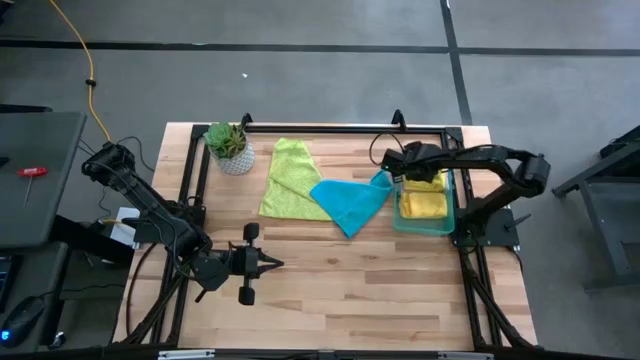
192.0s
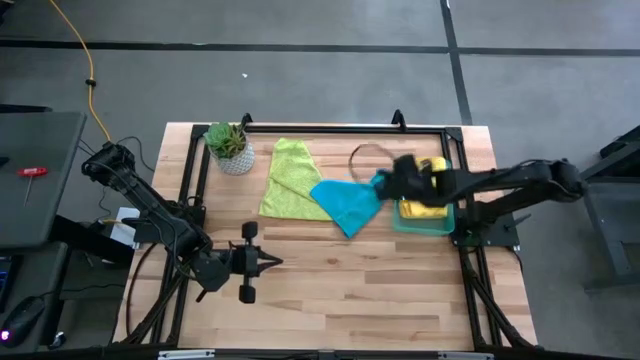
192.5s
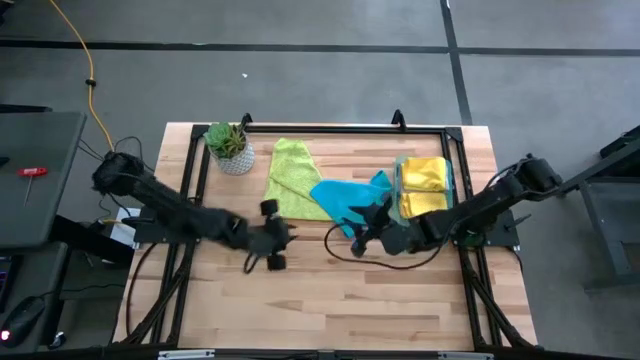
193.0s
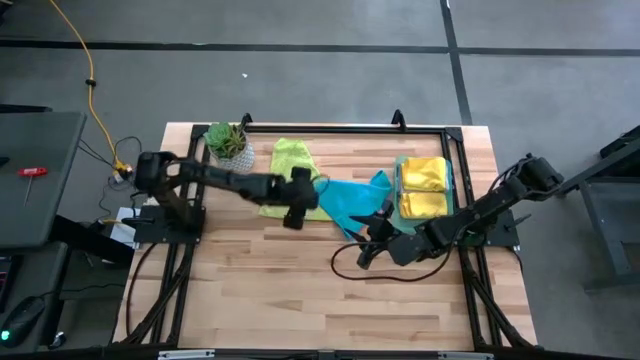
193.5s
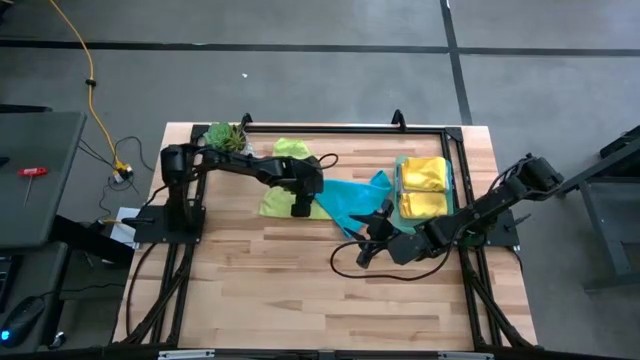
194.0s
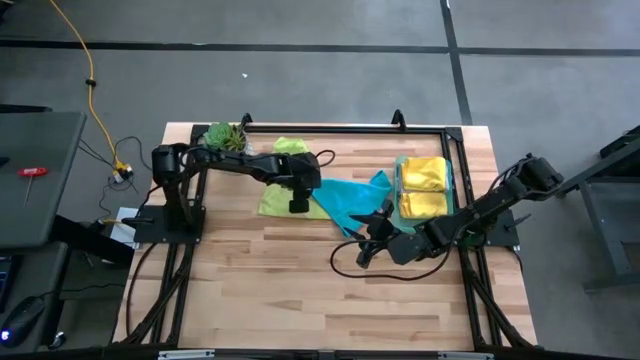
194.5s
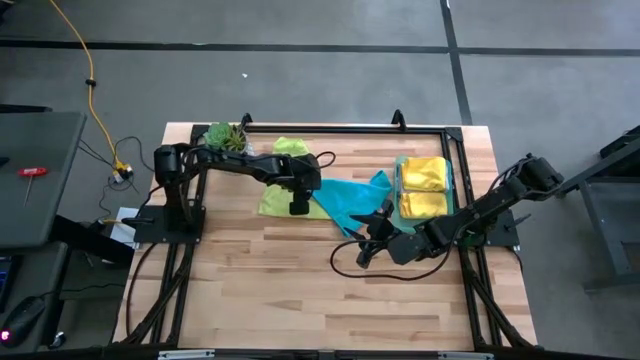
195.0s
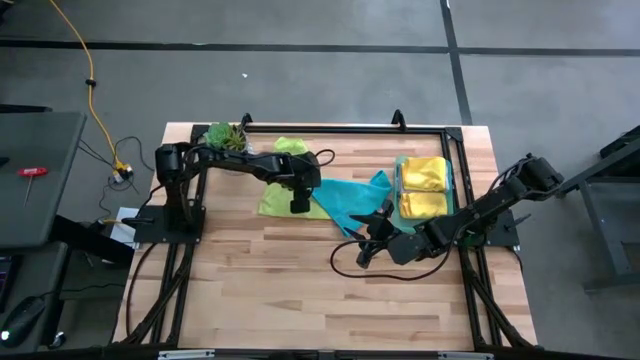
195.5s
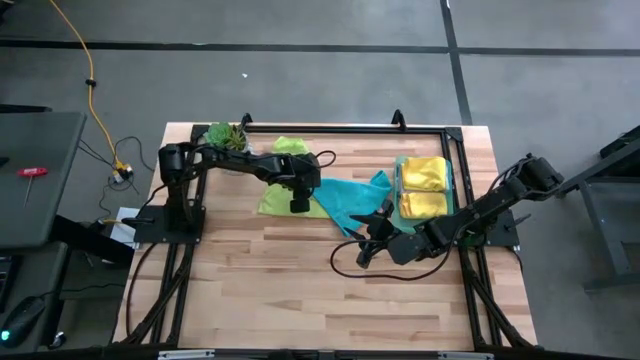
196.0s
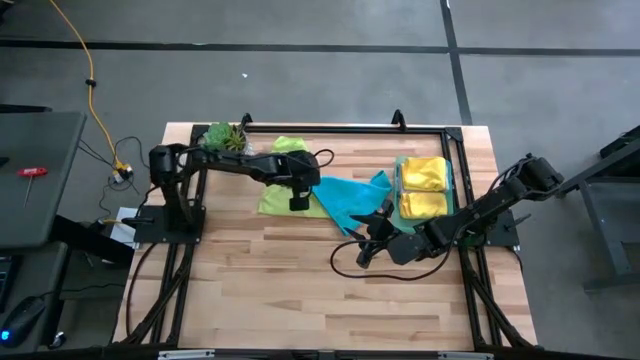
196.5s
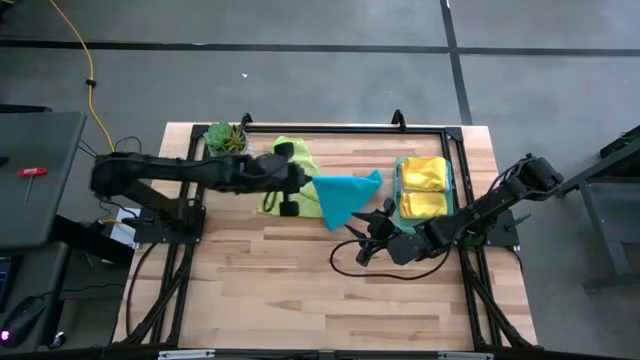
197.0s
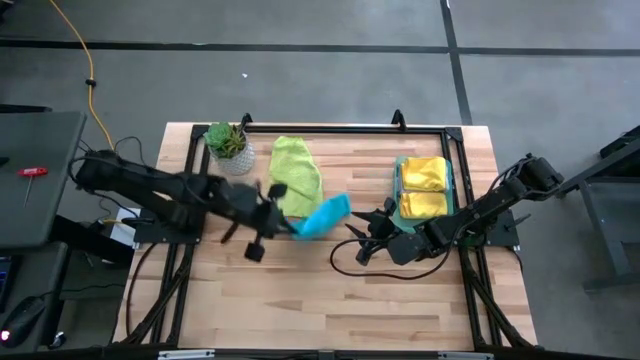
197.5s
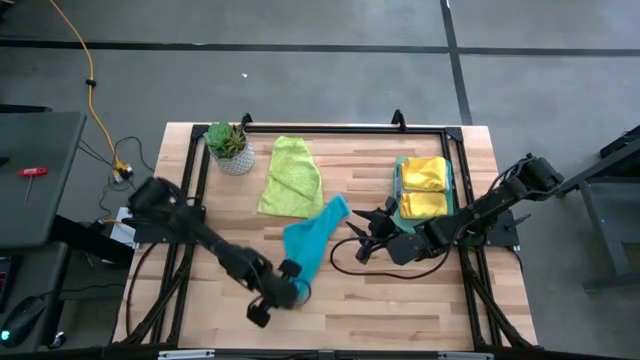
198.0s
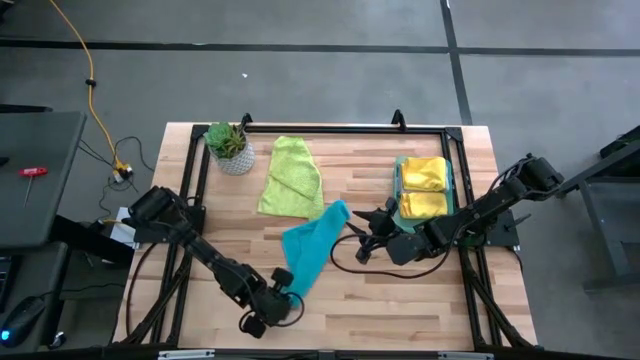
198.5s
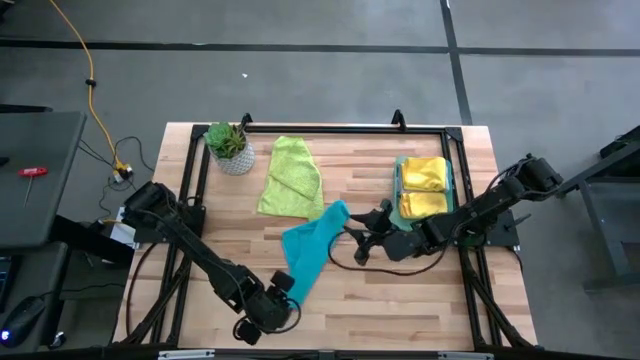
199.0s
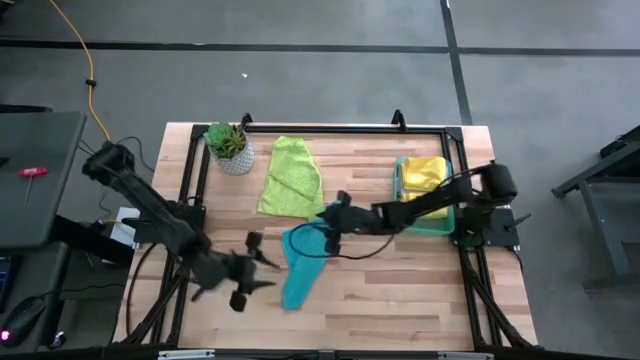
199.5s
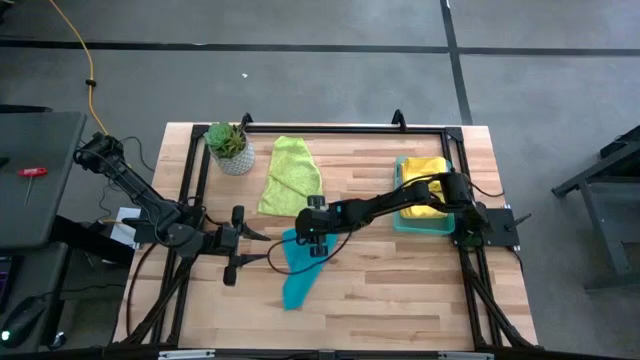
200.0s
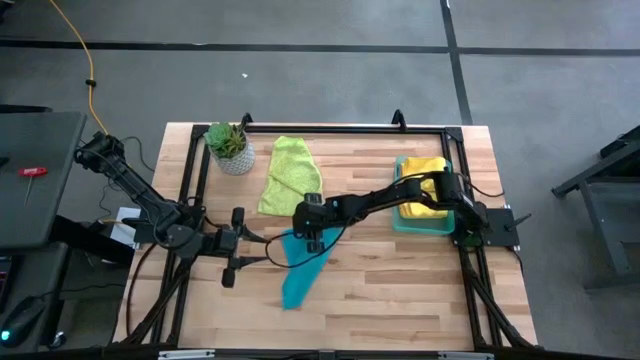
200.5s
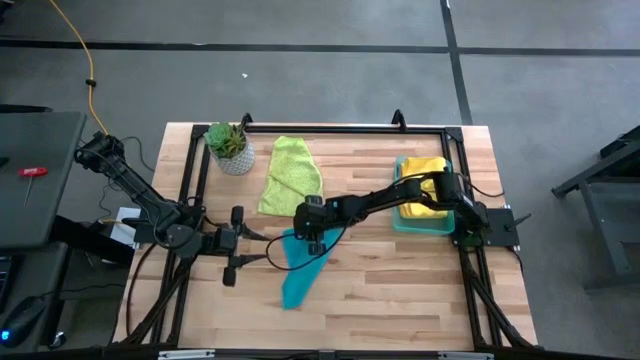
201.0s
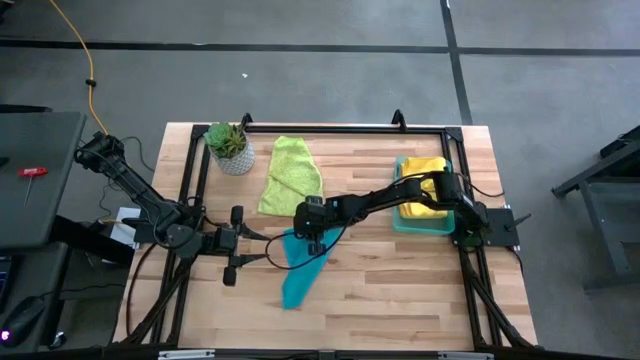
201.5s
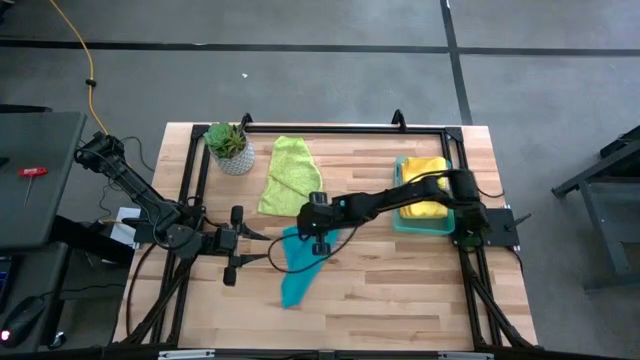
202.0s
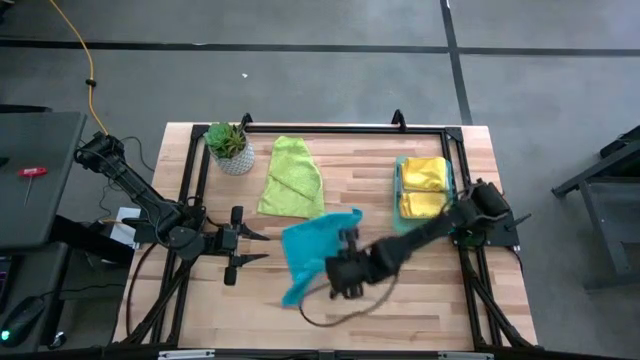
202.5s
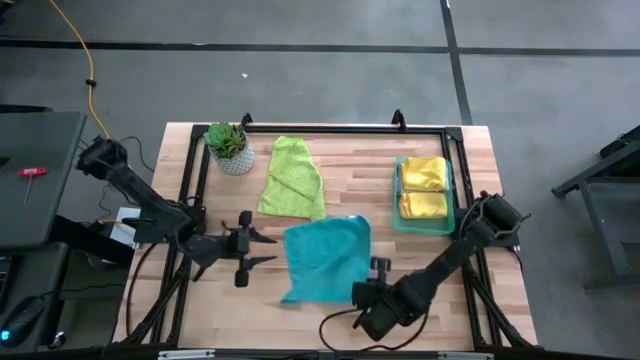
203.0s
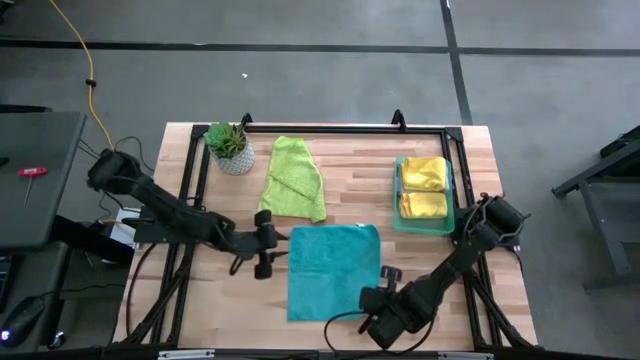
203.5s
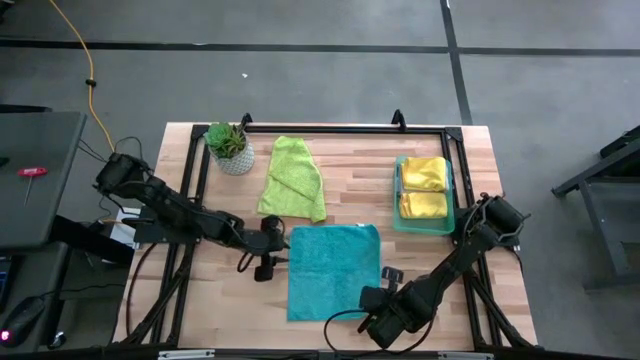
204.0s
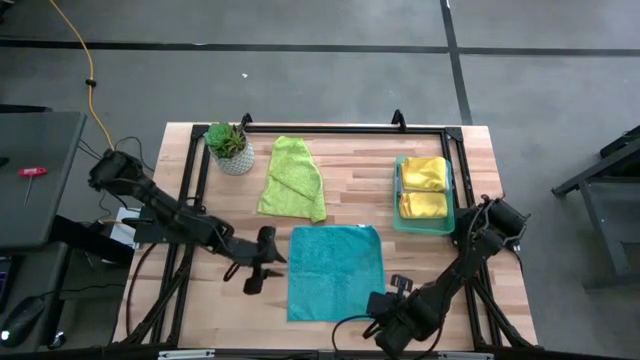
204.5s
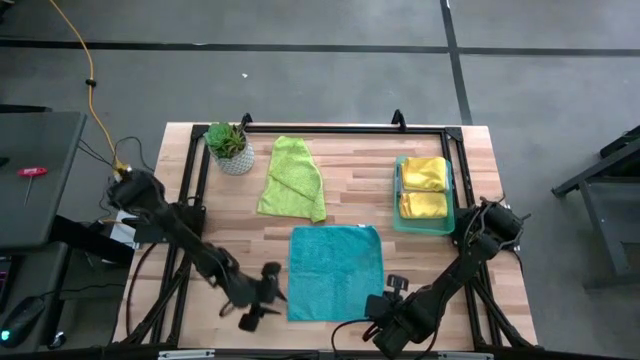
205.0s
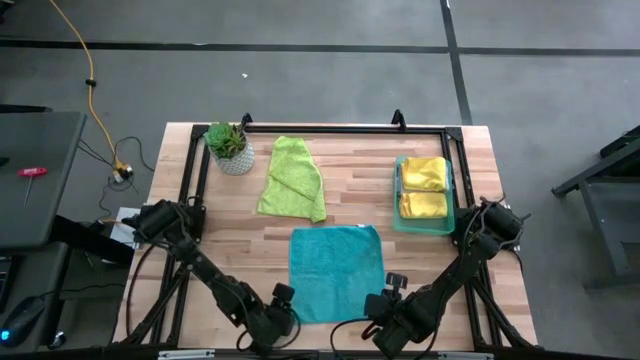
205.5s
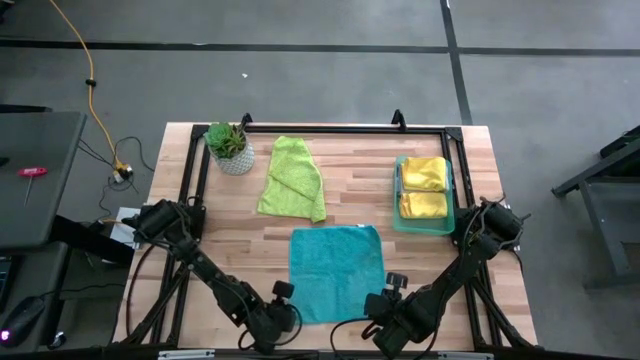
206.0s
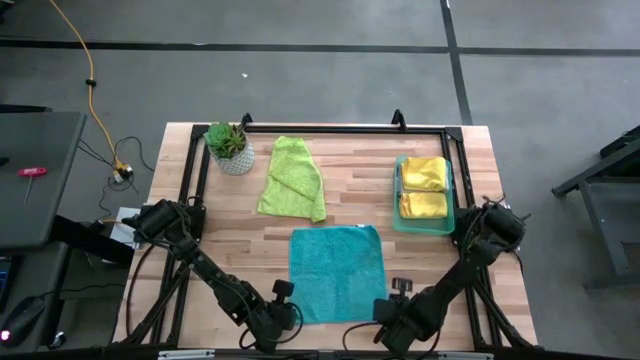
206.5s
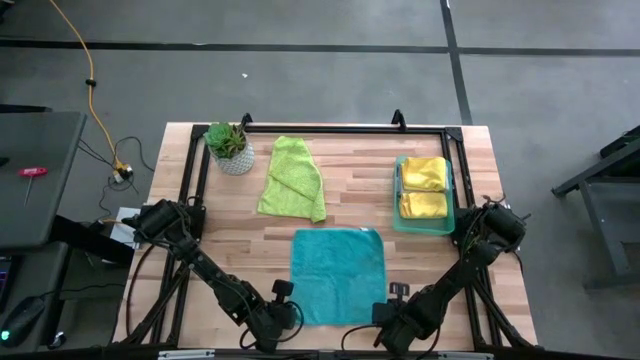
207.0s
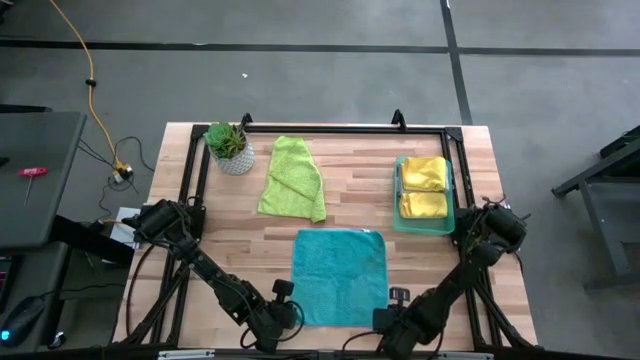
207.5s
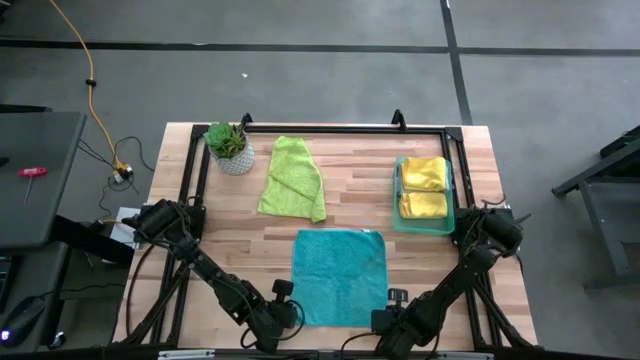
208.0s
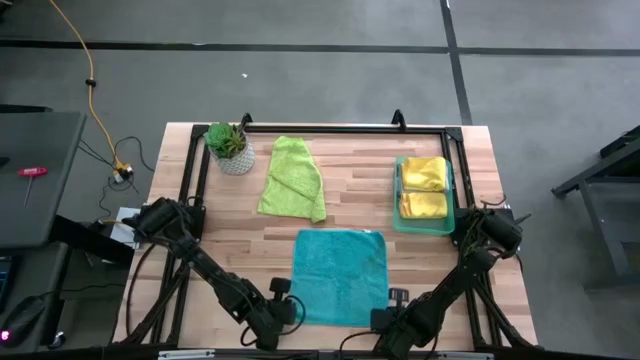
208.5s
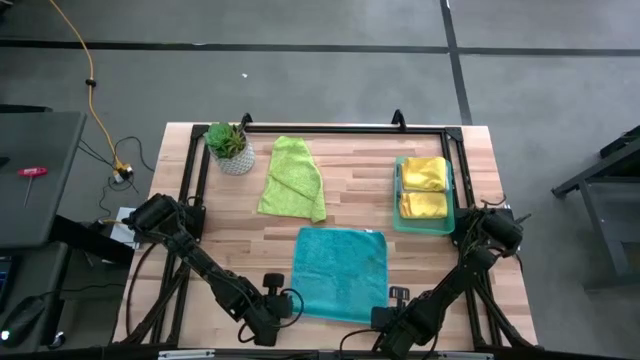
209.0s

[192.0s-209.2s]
Task: Fold microfiber towels
Fold the blue microfiber cloth

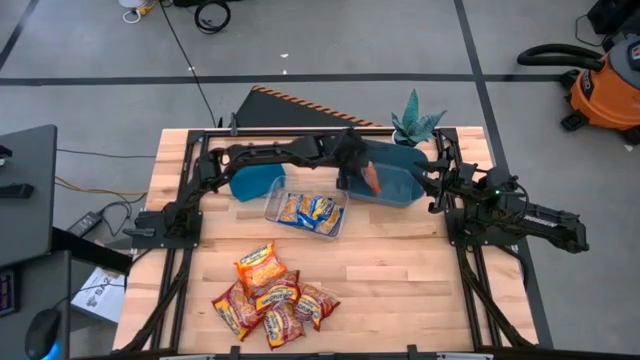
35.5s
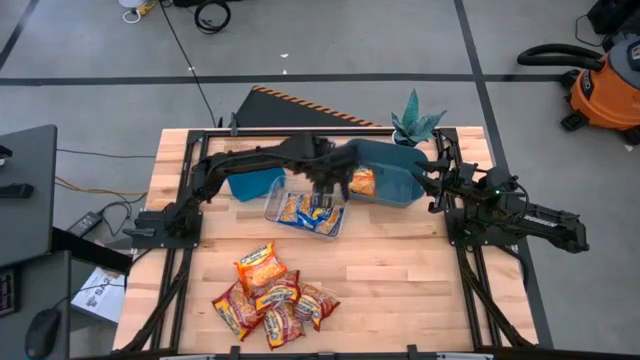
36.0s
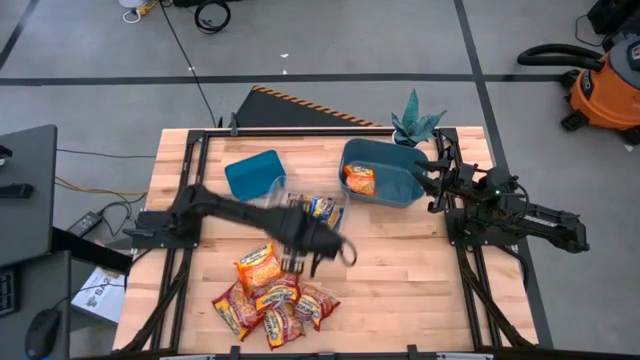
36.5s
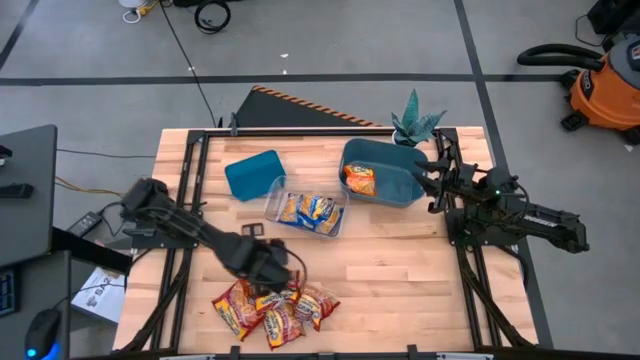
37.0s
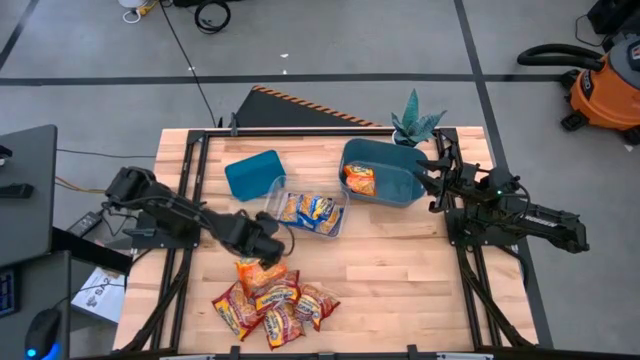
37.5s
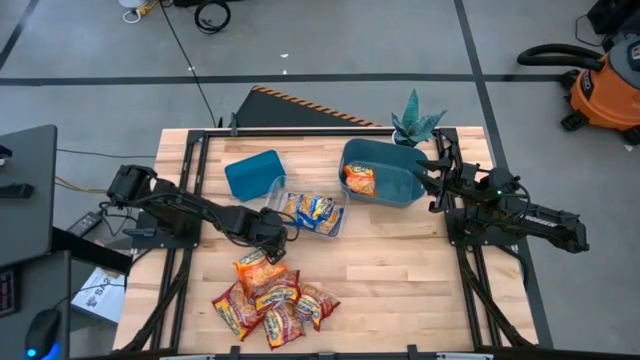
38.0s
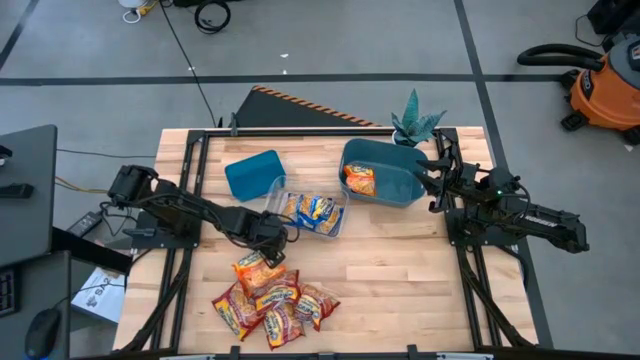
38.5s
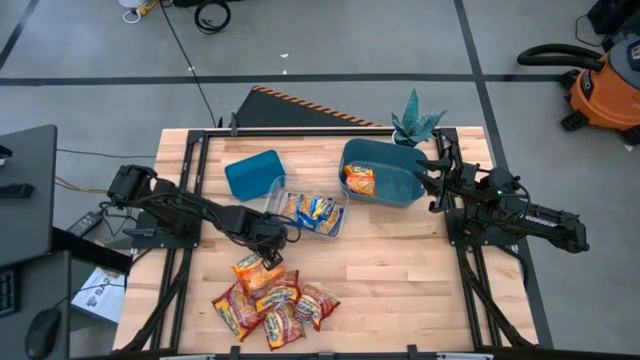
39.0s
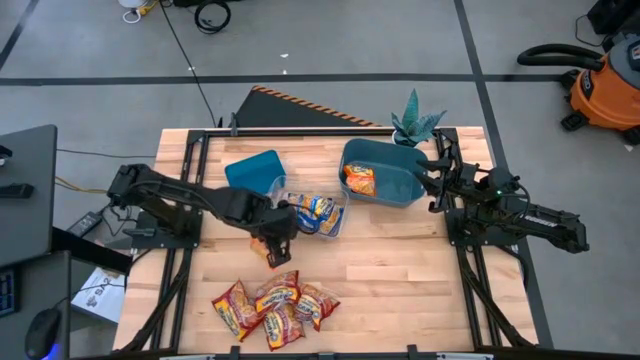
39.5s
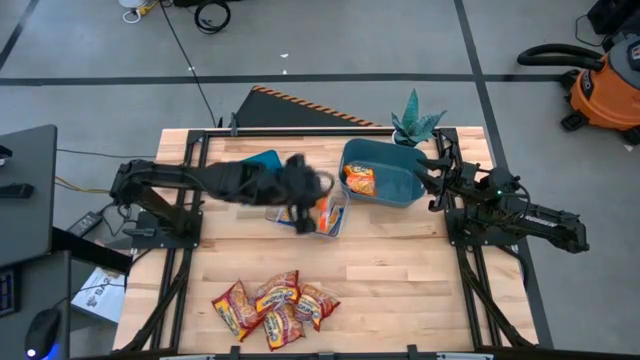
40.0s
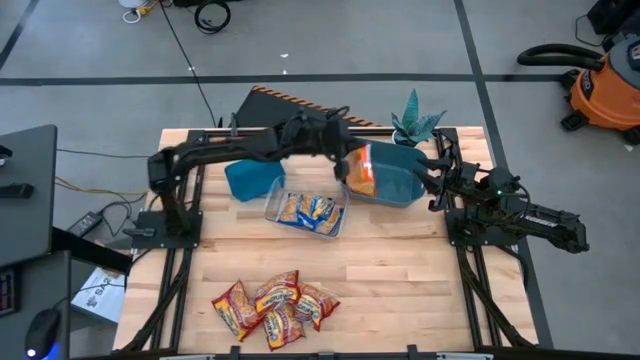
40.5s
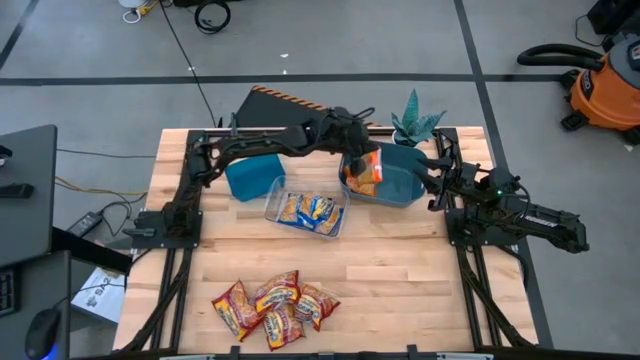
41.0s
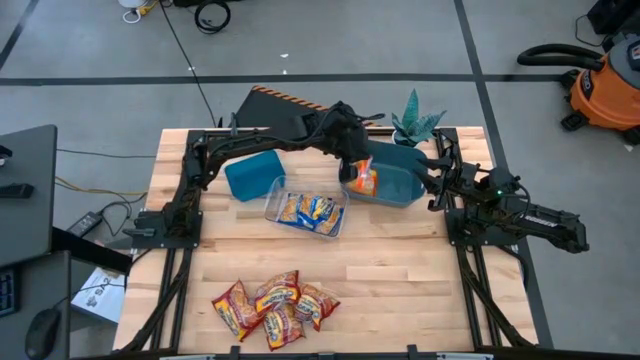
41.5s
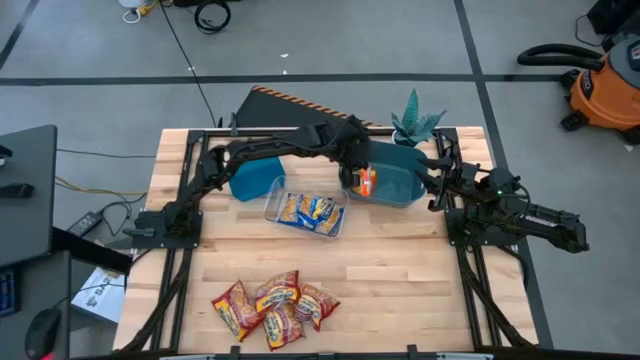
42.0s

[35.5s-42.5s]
Task: Sort Maruchan noodles
Put the orange noodle pack into the right large dark blue bin
